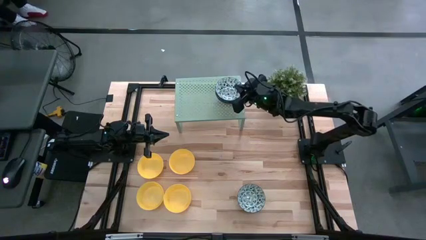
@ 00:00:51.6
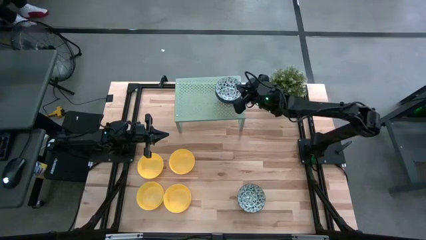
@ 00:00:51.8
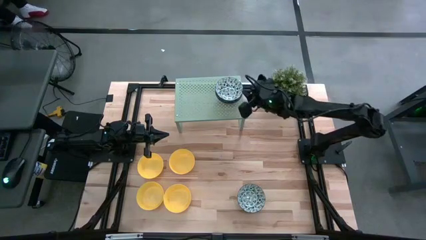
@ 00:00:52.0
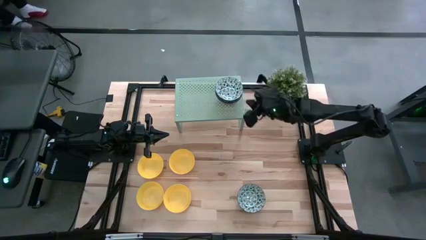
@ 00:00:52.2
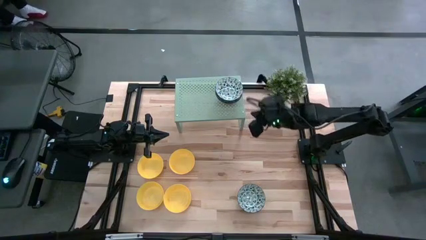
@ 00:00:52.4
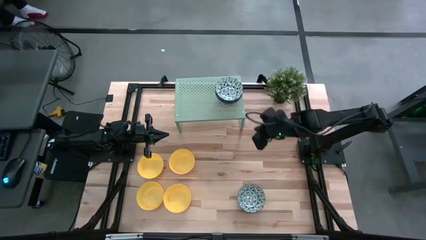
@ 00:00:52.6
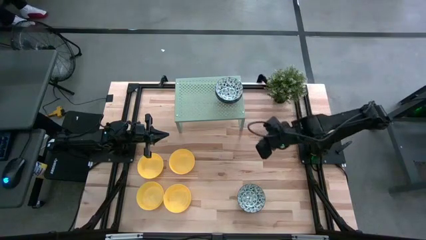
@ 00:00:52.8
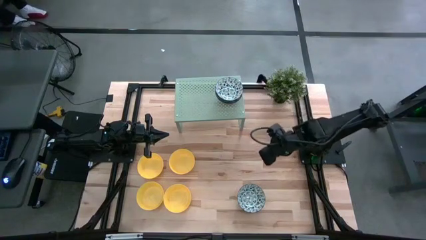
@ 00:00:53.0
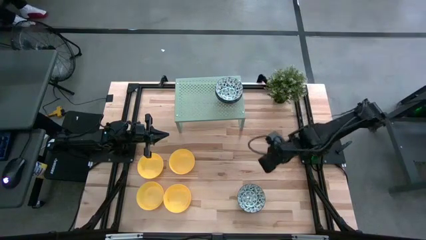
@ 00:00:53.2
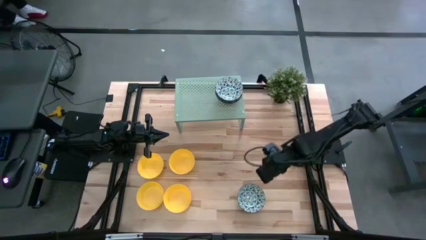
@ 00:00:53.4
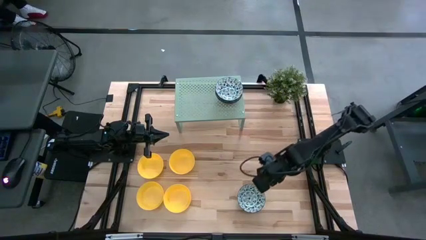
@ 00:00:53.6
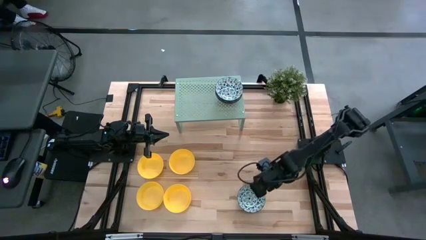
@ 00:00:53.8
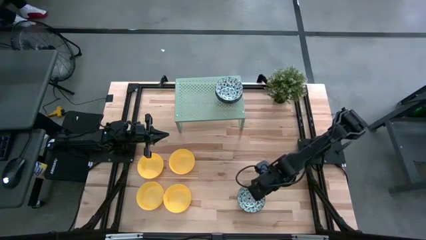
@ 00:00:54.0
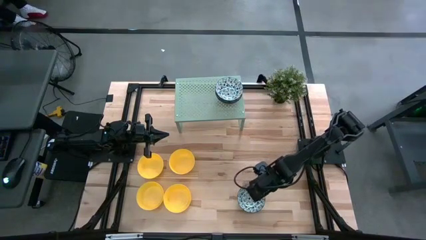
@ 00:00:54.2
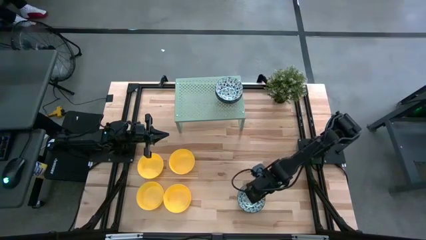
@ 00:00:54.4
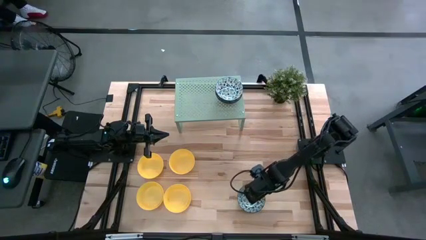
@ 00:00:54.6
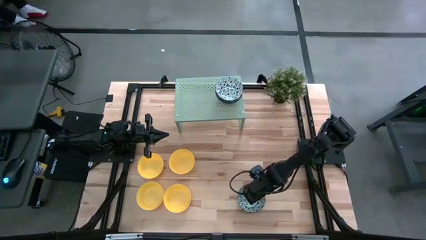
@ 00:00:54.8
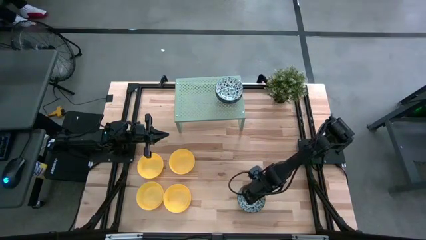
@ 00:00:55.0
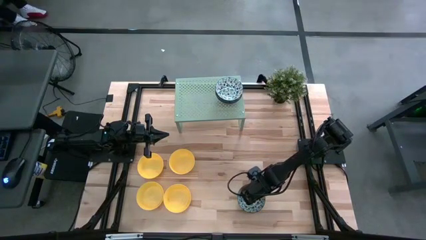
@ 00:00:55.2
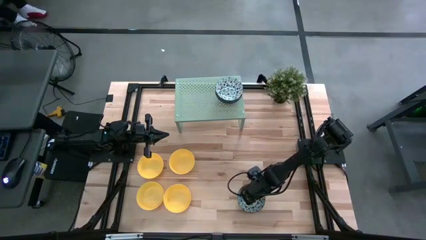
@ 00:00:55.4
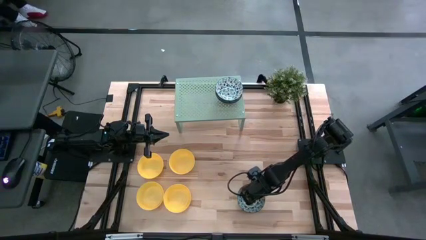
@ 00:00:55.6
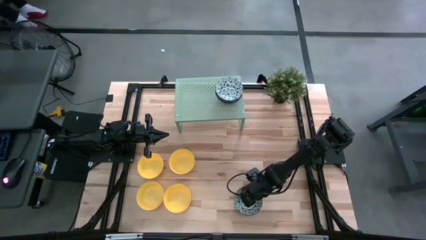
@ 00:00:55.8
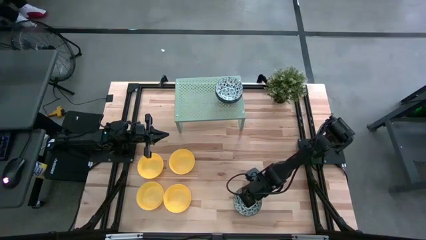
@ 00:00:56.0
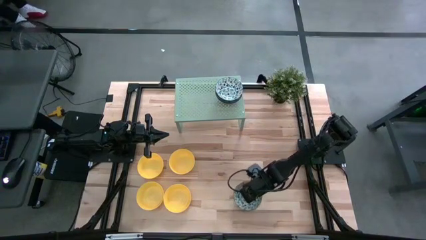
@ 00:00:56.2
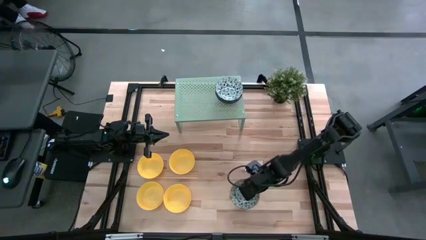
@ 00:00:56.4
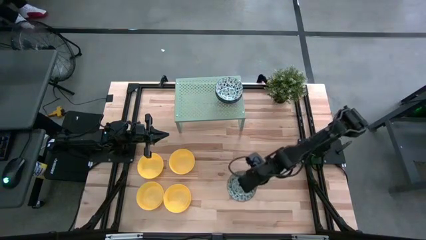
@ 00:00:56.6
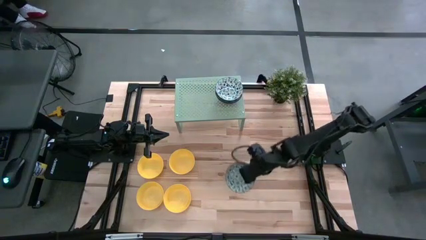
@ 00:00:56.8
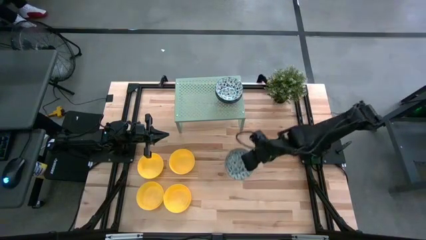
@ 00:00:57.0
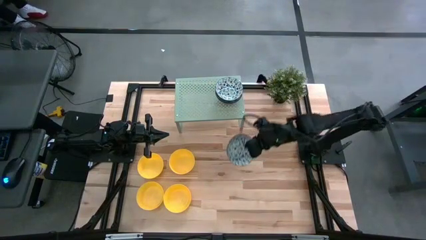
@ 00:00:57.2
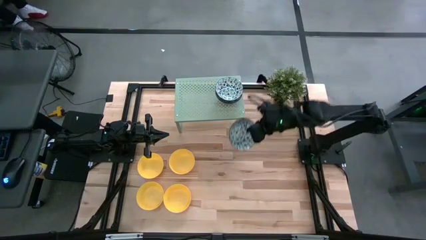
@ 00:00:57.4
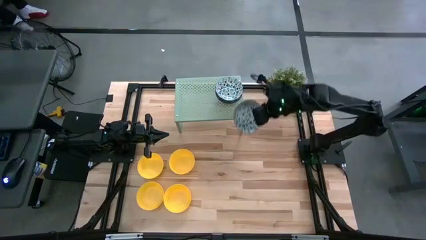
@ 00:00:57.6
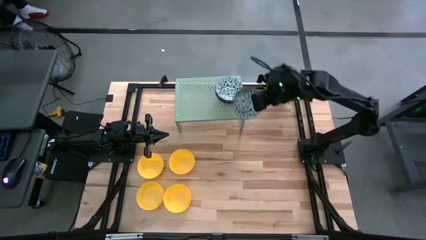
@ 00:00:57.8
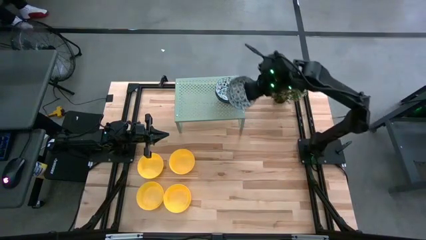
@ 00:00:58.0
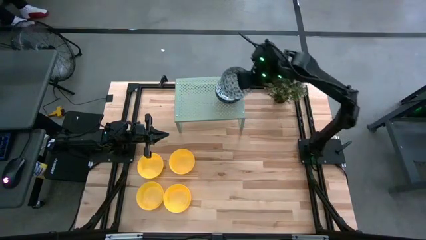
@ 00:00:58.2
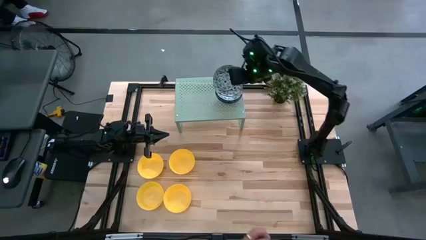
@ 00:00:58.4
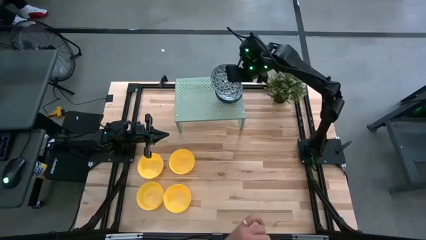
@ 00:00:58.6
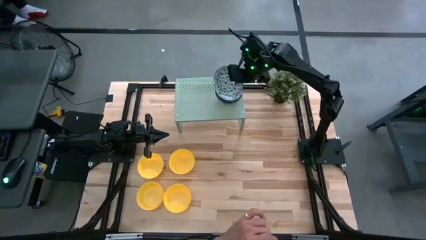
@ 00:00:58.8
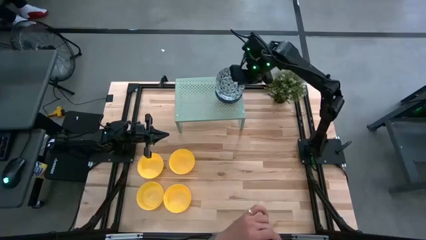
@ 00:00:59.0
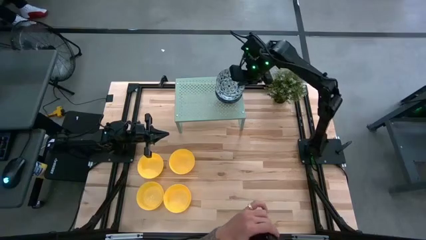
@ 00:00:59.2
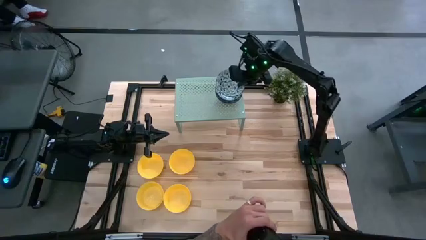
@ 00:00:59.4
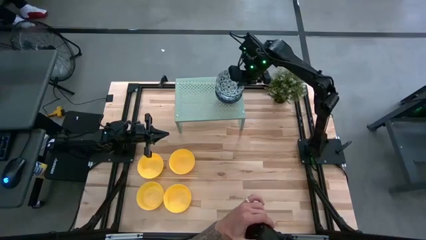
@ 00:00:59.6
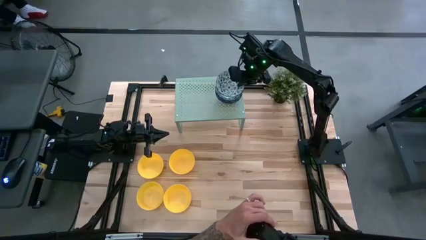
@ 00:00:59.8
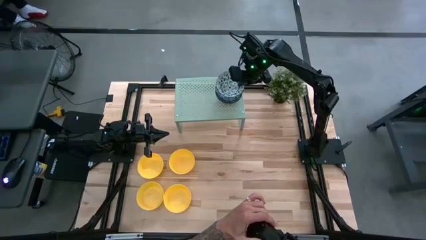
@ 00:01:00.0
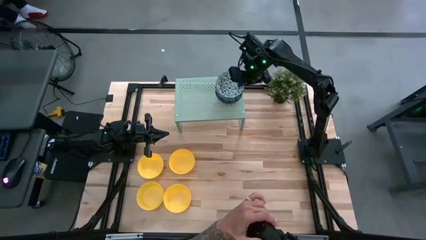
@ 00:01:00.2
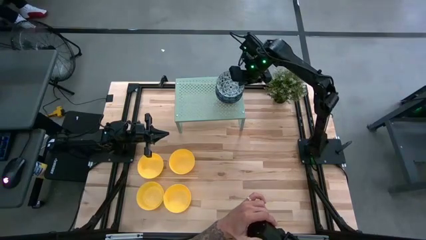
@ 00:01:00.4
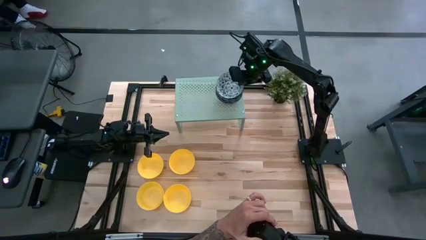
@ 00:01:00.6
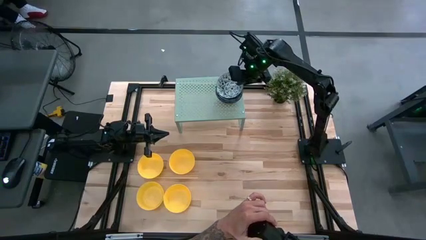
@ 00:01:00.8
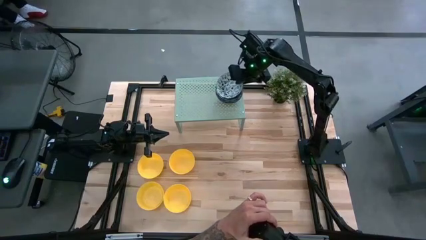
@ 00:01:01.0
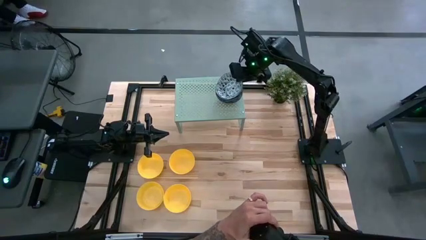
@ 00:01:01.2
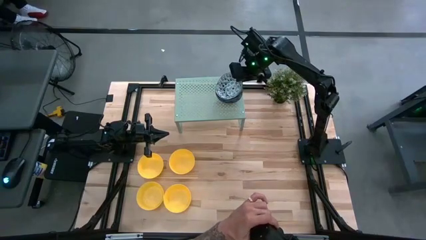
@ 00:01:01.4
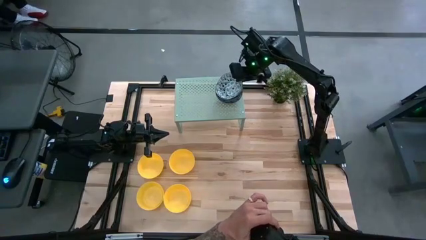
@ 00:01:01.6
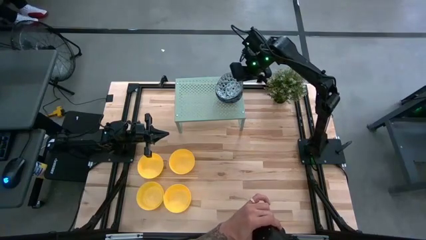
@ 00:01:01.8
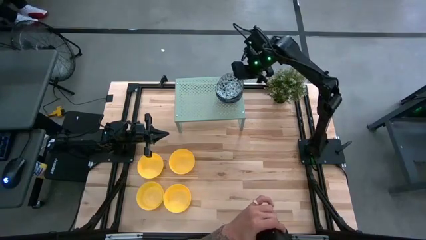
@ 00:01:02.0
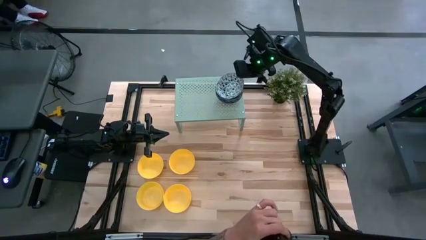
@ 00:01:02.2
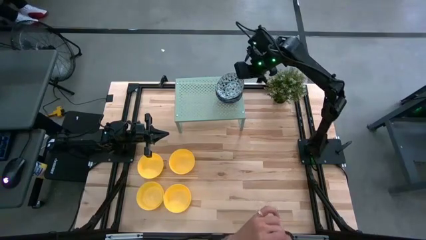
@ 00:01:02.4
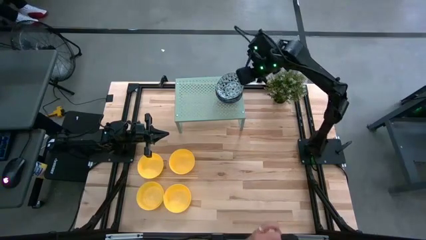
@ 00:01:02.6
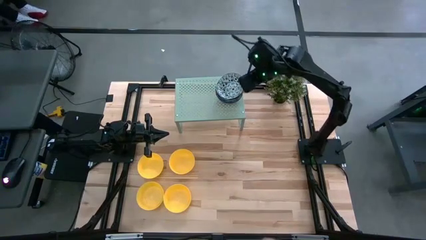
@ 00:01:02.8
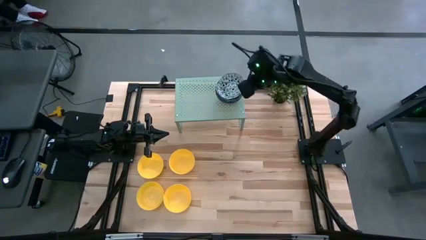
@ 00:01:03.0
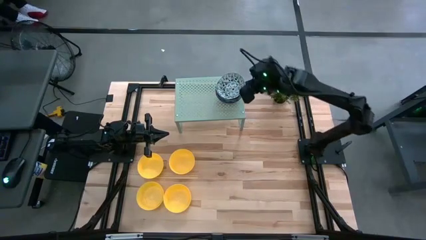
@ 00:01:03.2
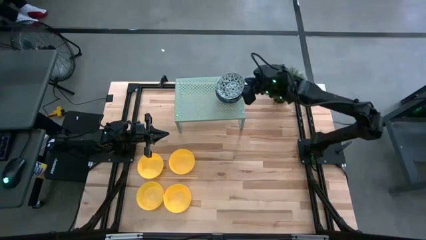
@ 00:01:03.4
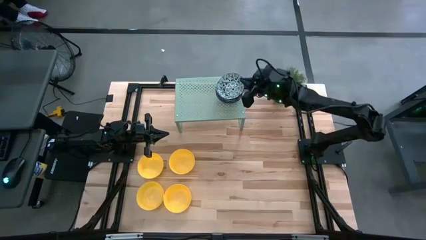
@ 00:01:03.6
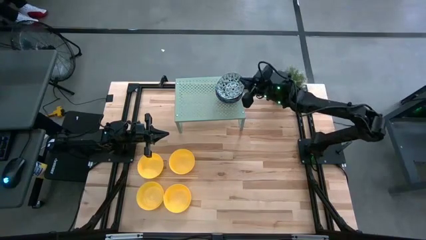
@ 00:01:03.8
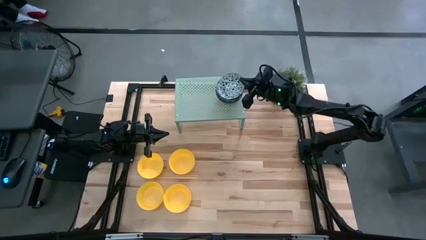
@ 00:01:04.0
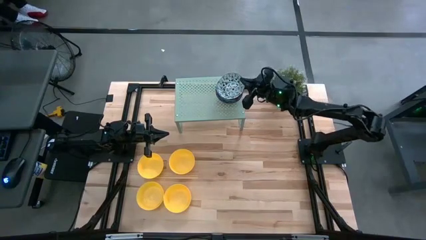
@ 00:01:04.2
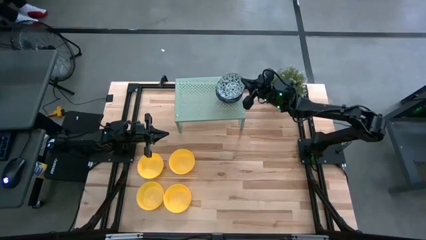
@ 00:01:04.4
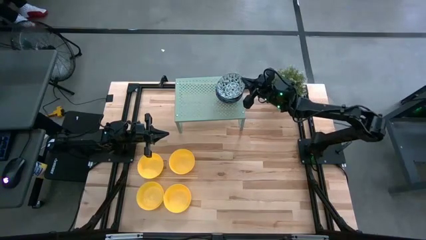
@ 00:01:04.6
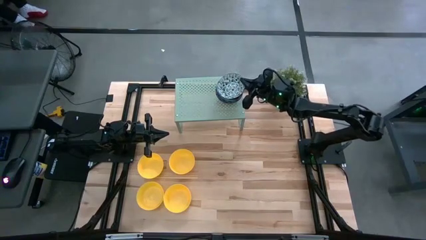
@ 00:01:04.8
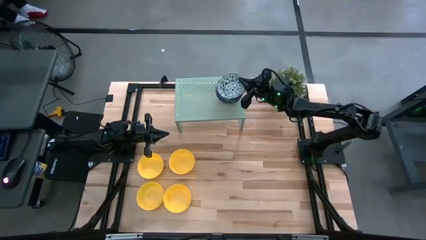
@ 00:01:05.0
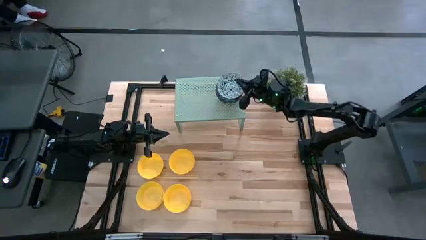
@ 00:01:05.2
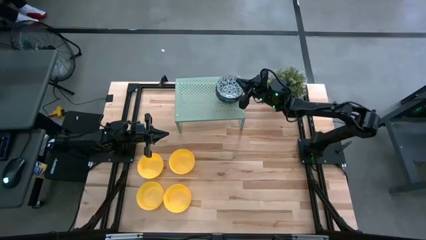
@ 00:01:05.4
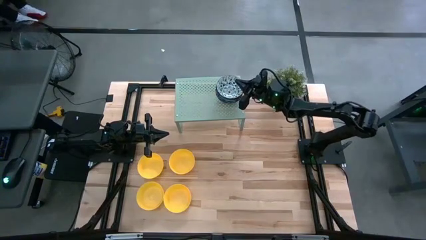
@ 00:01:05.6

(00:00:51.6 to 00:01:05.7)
Task: Pick & Place Mini bowls
Stack the blue patterned bowl on top of the other blue patterned bowl on the shelf
